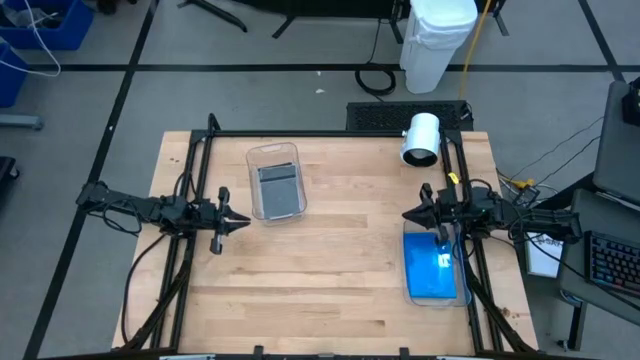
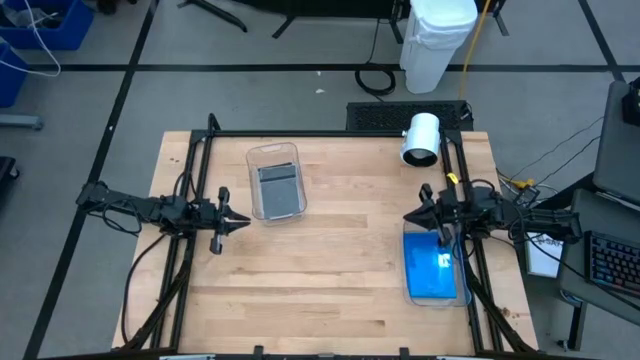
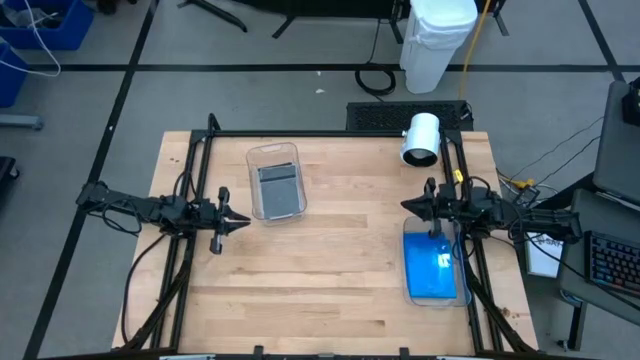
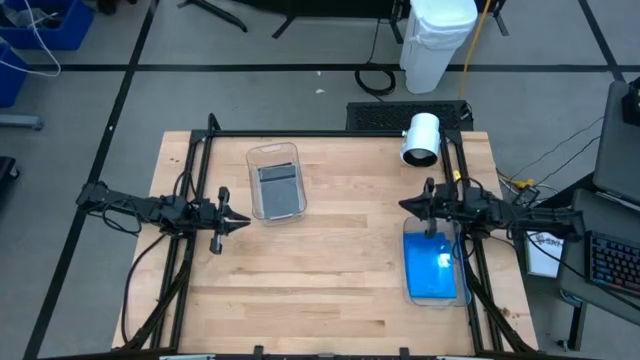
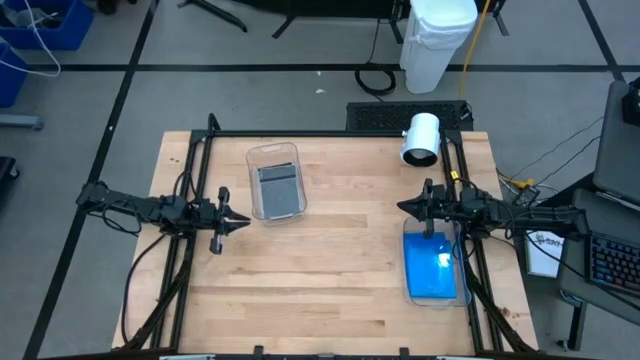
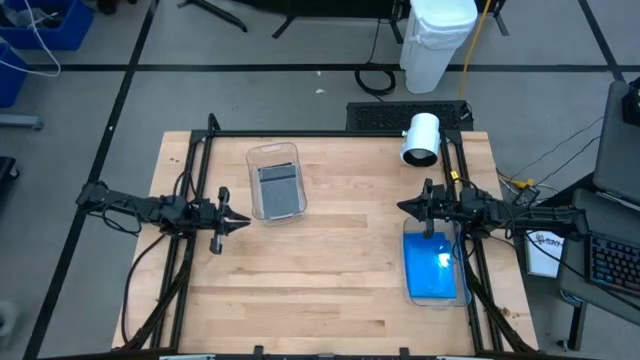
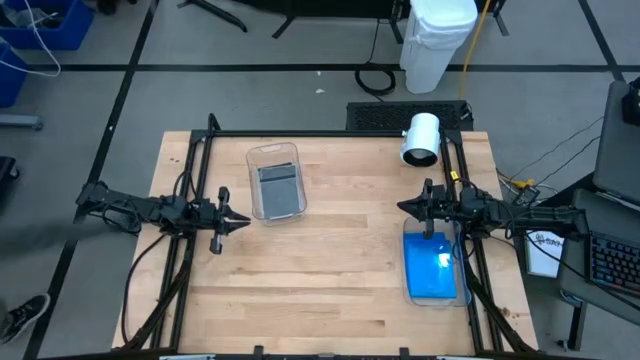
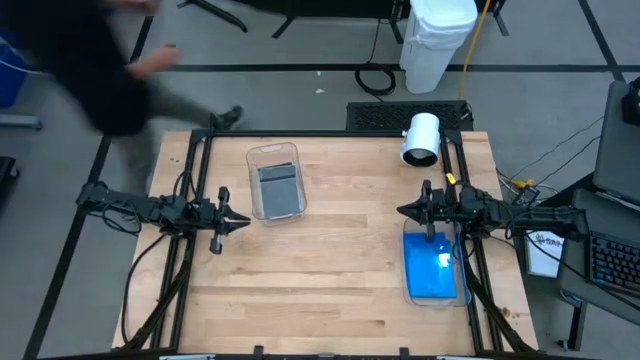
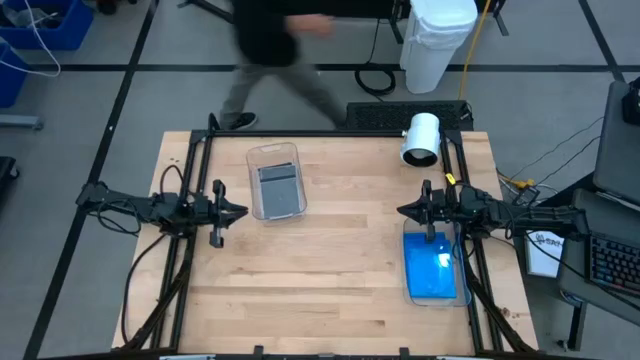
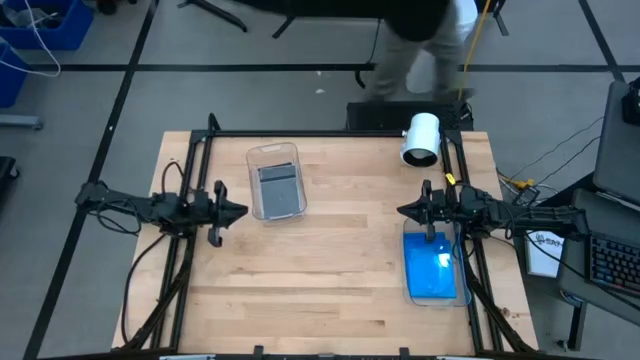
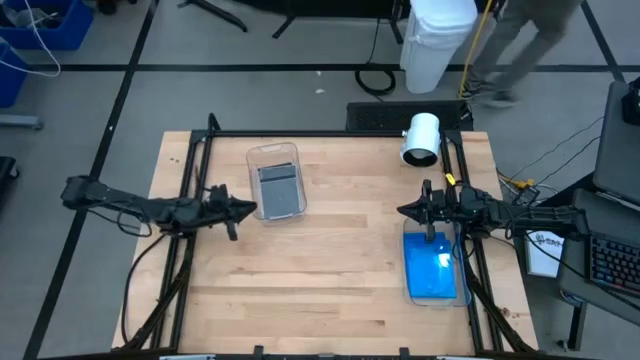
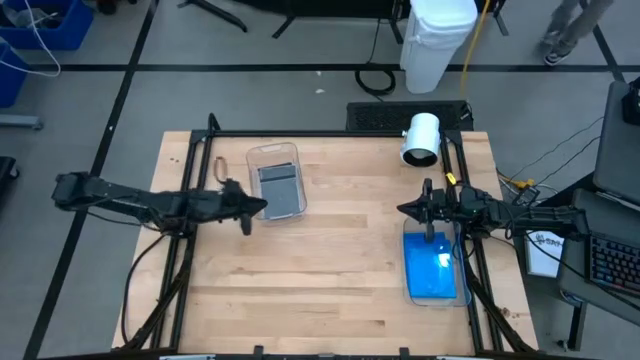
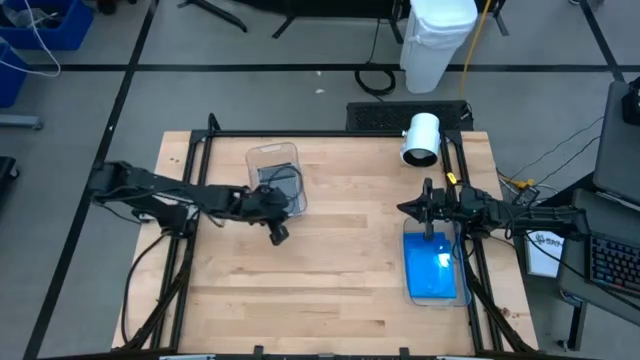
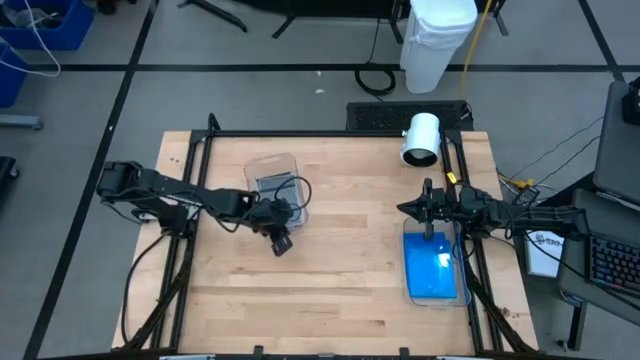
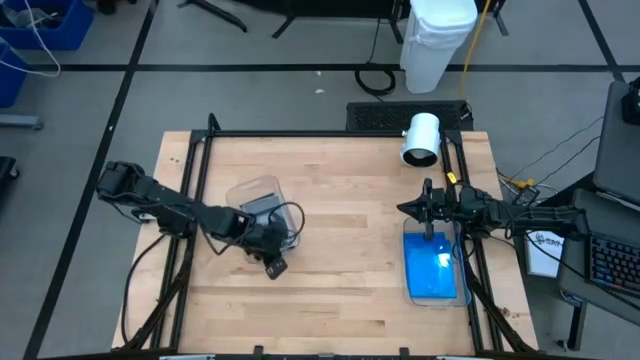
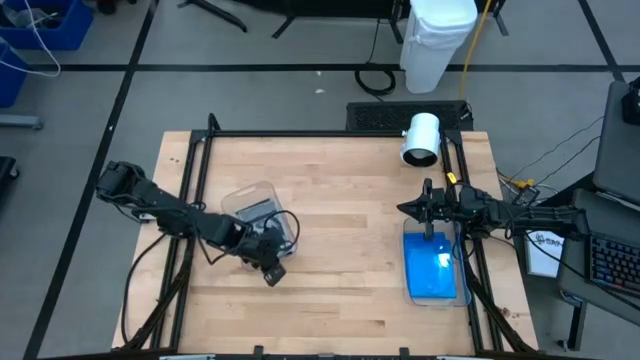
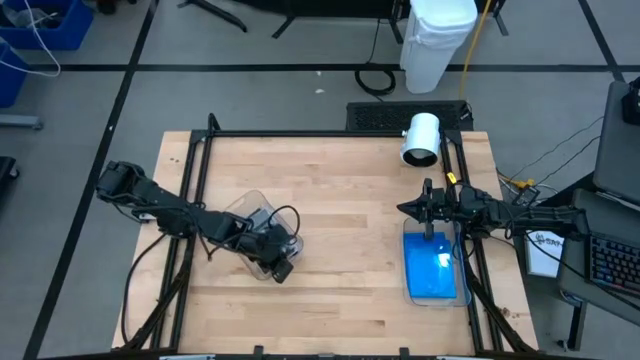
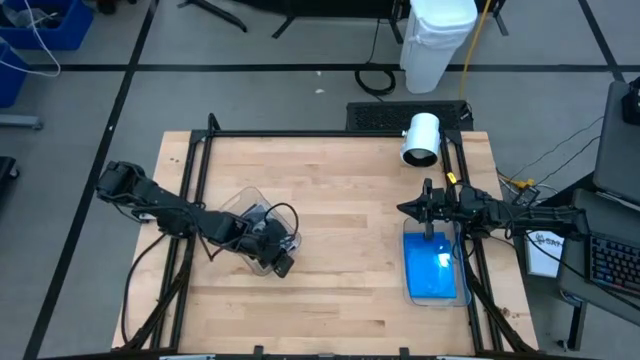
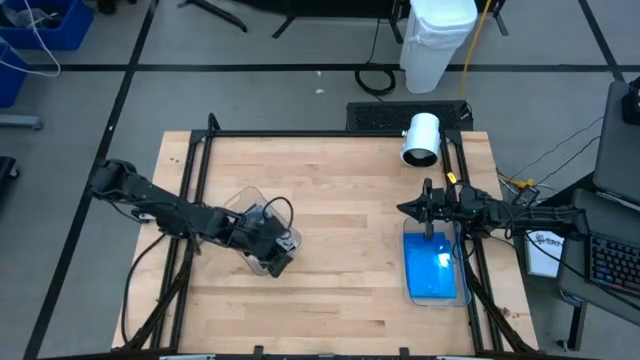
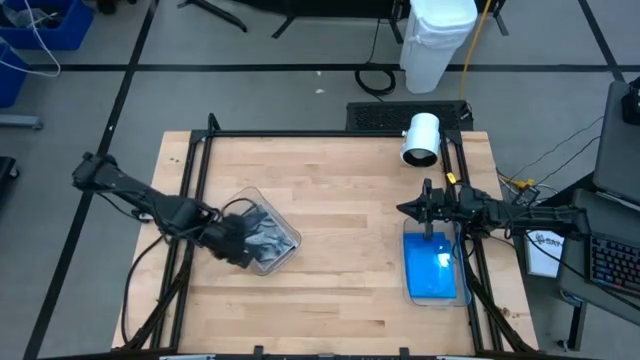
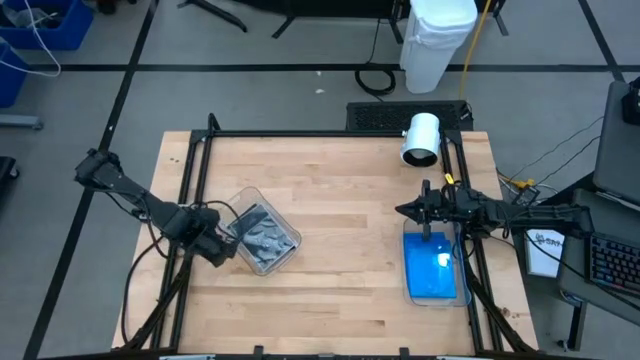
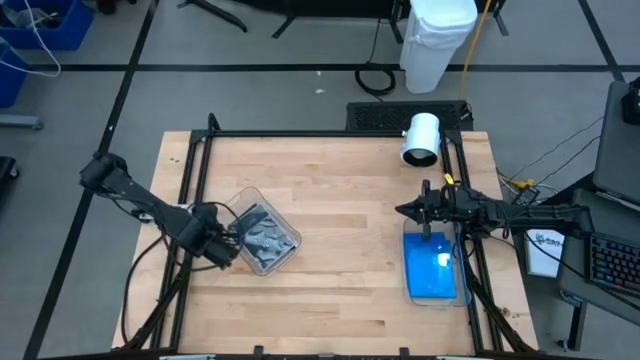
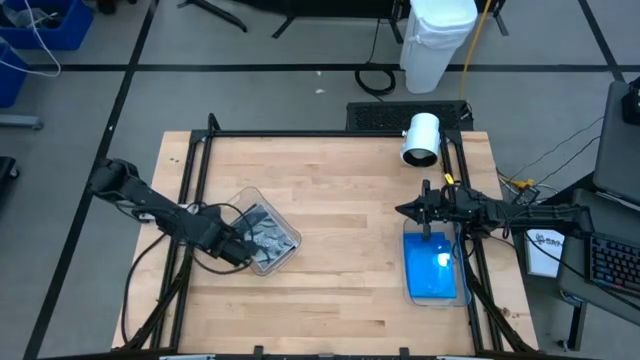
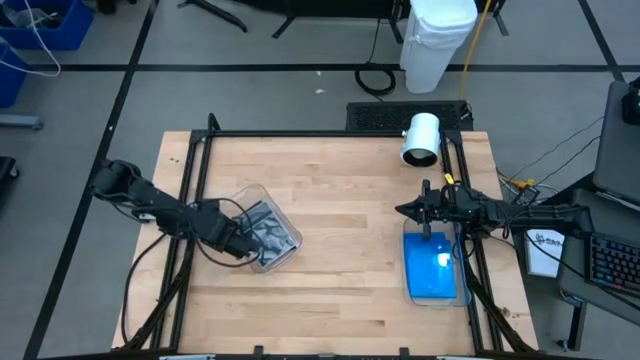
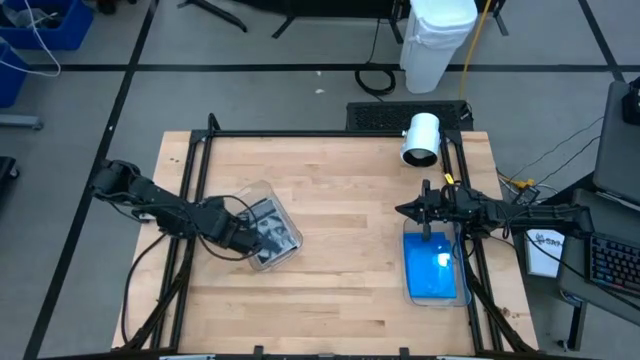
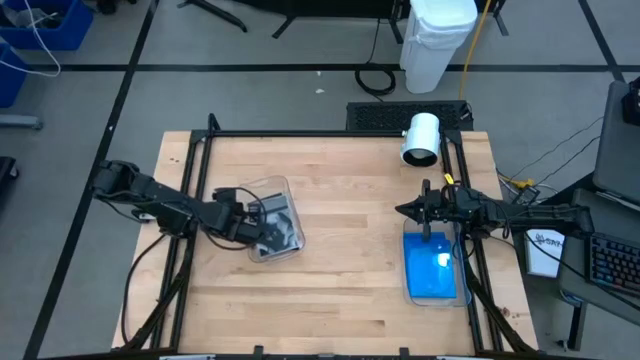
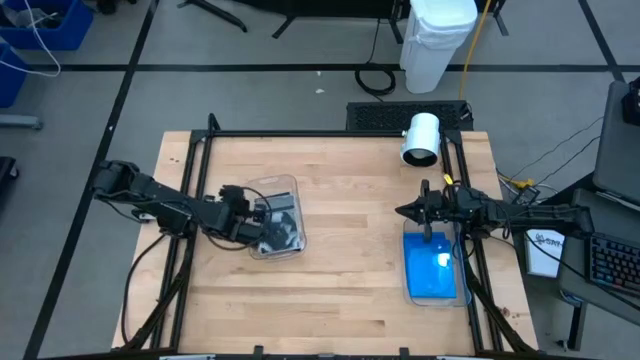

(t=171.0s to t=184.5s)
Task: Pick & place jewel cases by type
Adjust the left transparent bin

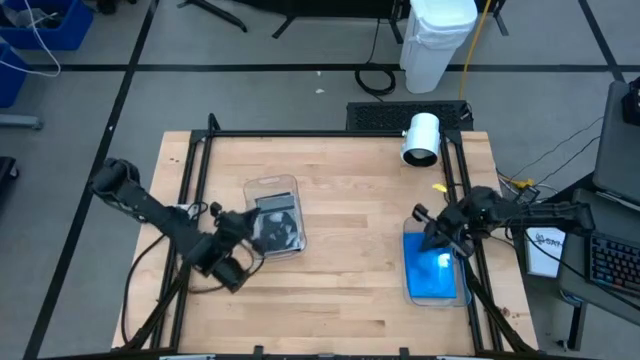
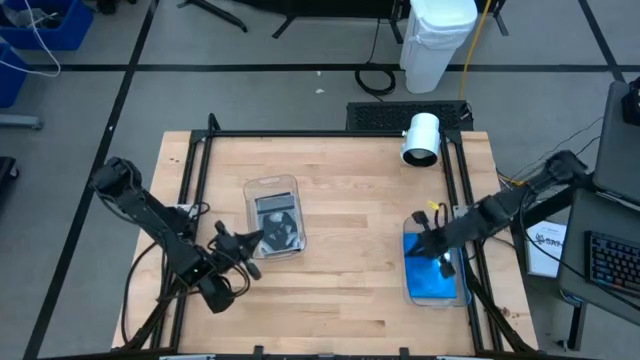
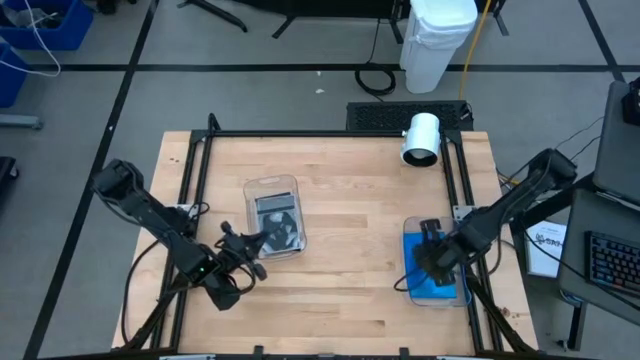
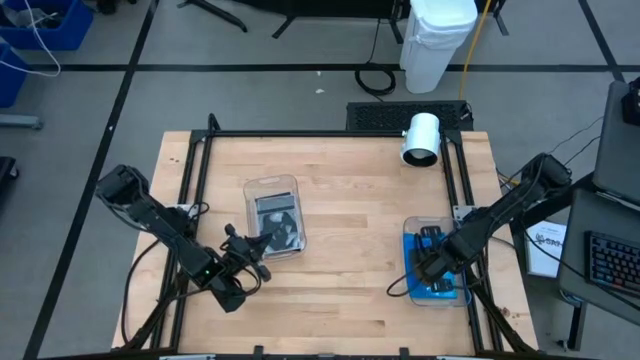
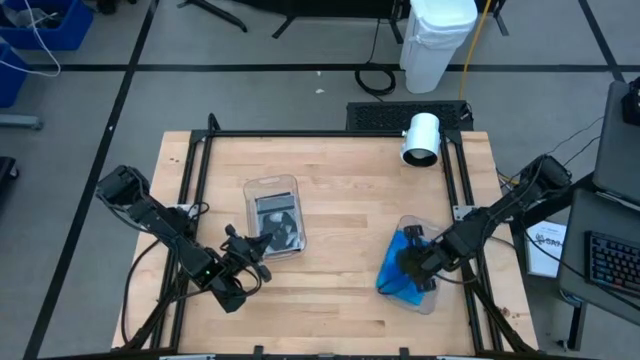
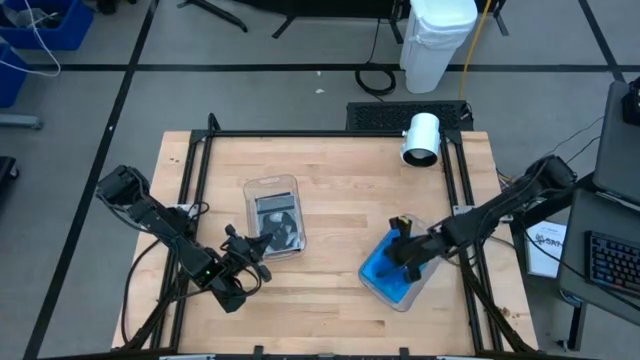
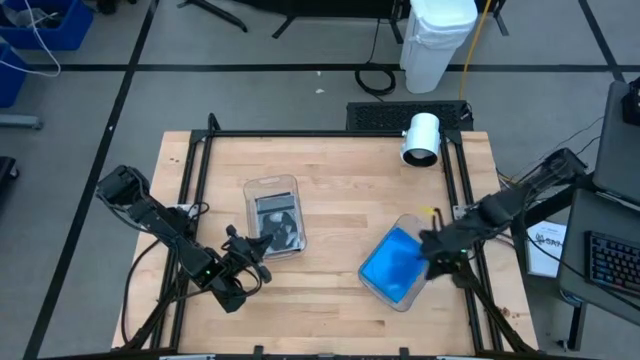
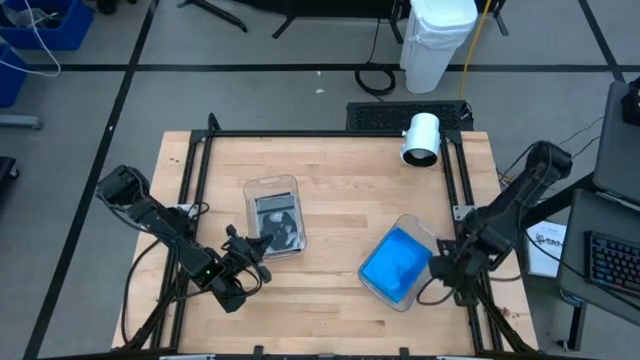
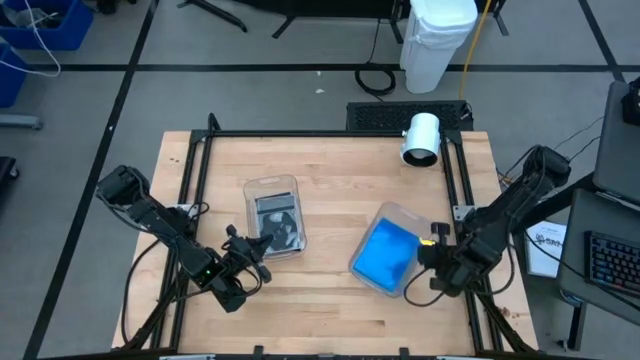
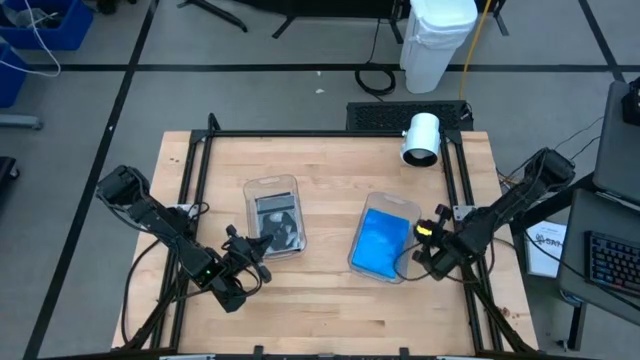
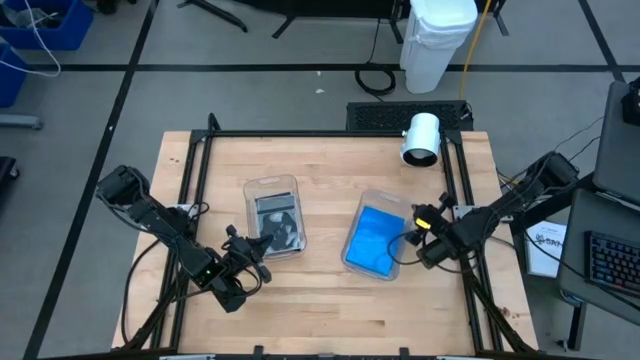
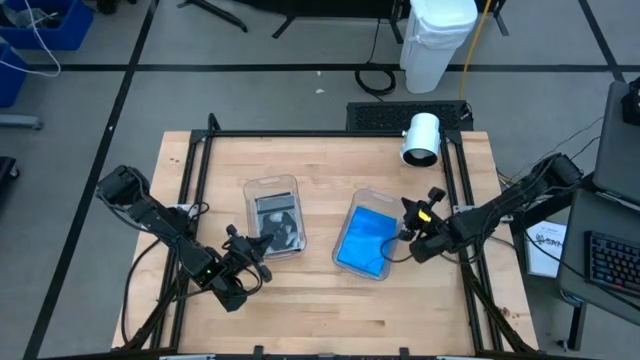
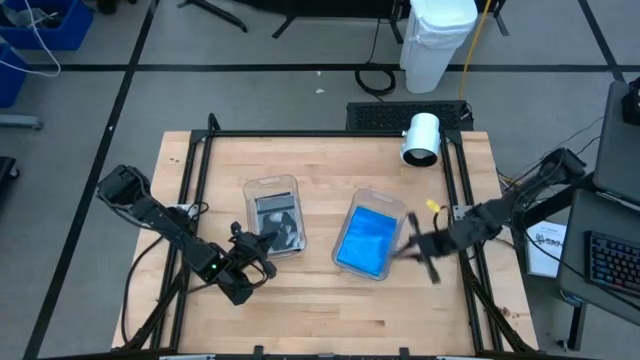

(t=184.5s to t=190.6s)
Adjust the right transparent bin

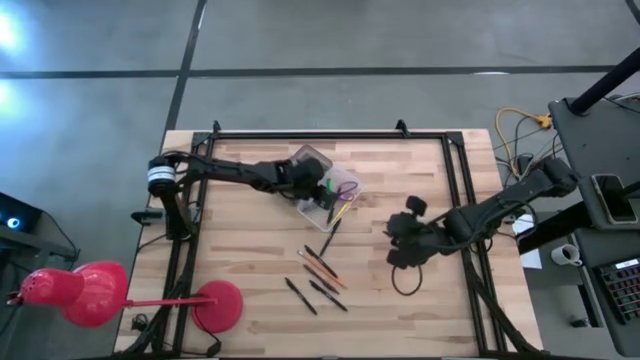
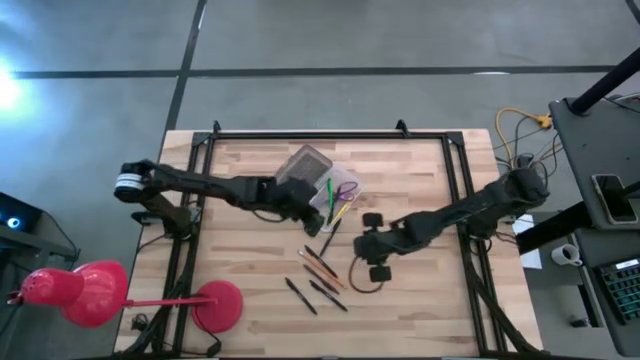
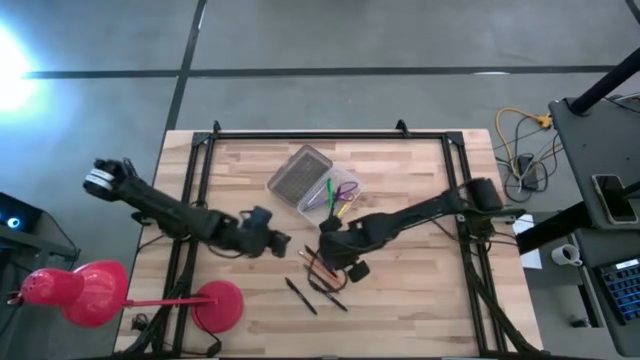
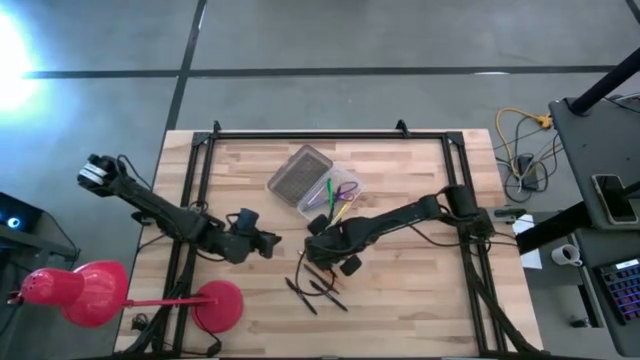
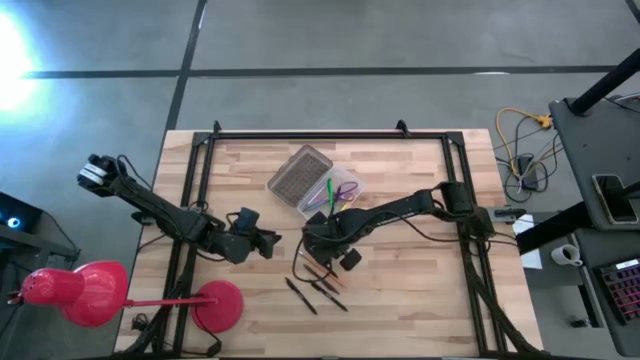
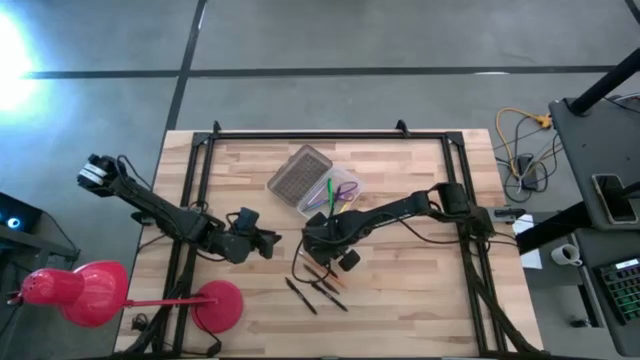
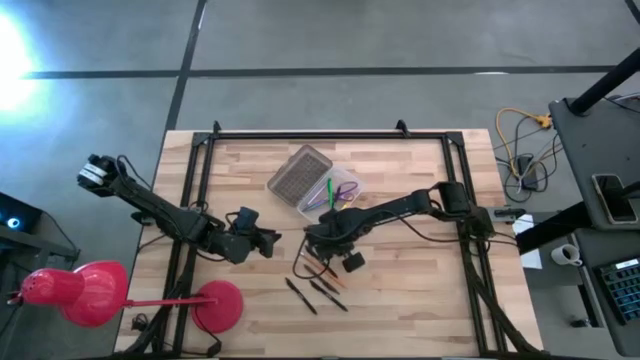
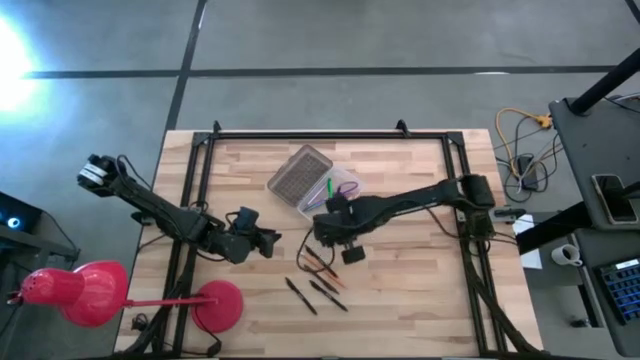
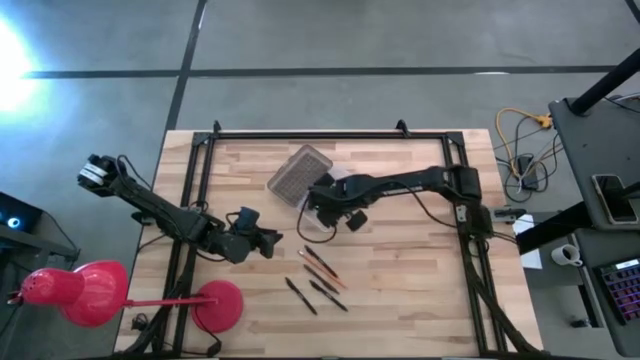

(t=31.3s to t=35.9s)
Task: Pick & place school supplies into a supply box
Put the black pen into the supply box
